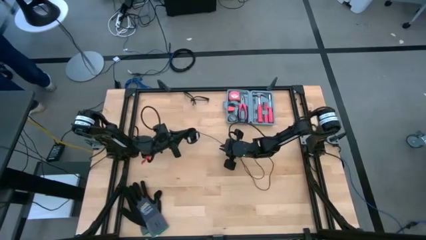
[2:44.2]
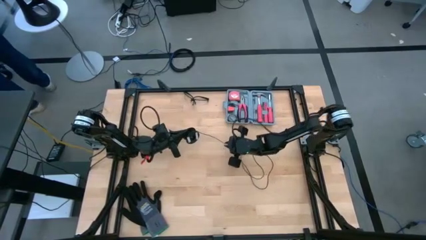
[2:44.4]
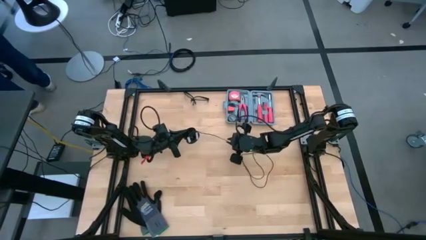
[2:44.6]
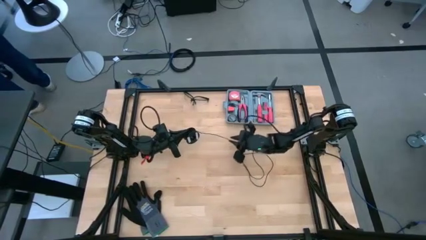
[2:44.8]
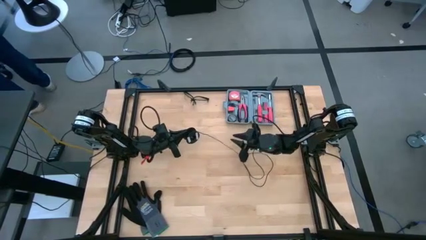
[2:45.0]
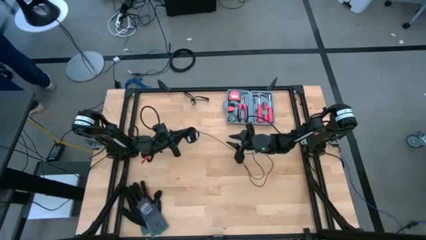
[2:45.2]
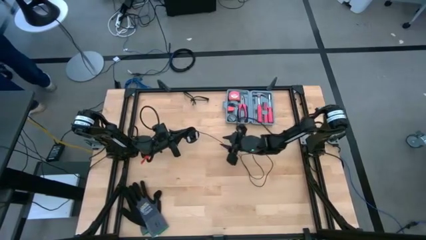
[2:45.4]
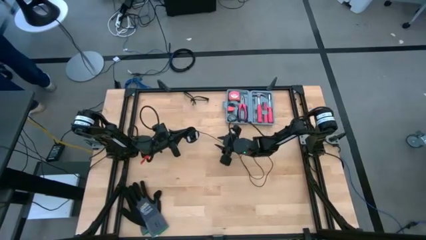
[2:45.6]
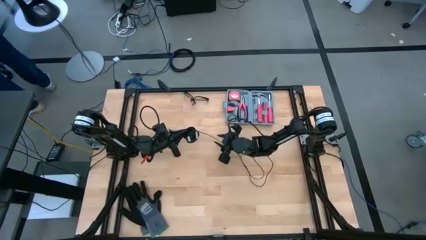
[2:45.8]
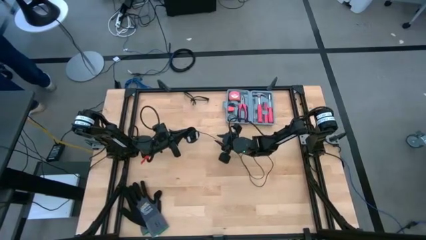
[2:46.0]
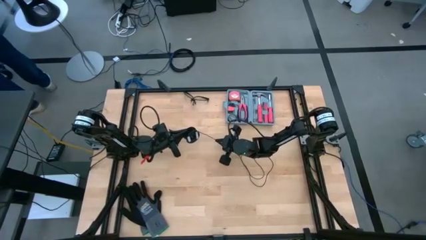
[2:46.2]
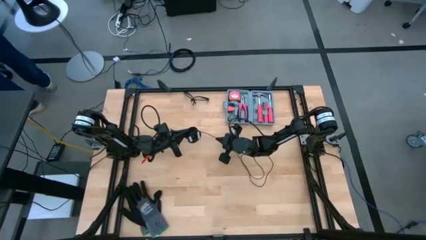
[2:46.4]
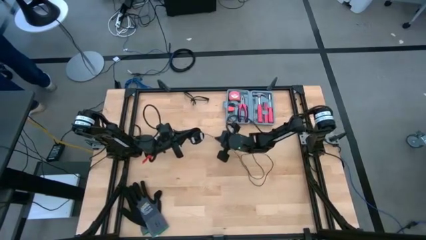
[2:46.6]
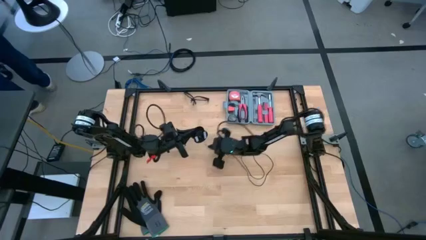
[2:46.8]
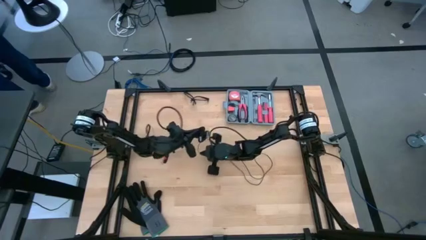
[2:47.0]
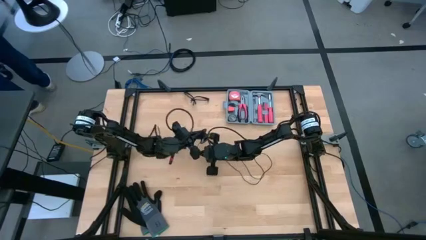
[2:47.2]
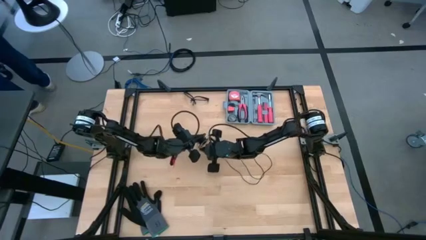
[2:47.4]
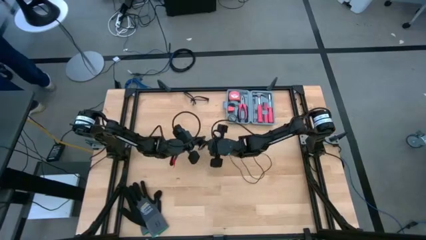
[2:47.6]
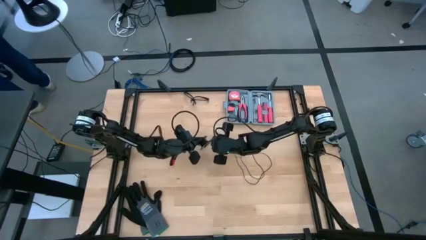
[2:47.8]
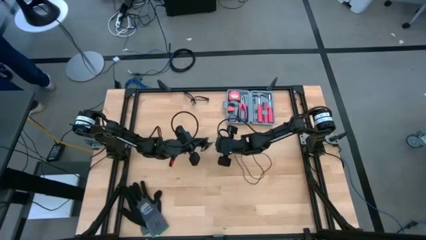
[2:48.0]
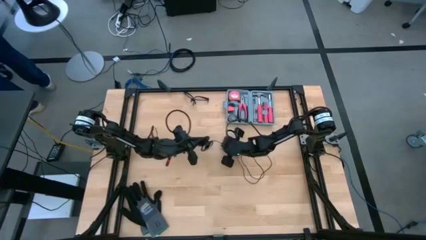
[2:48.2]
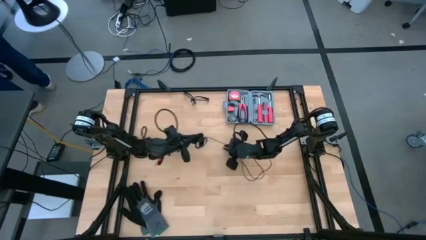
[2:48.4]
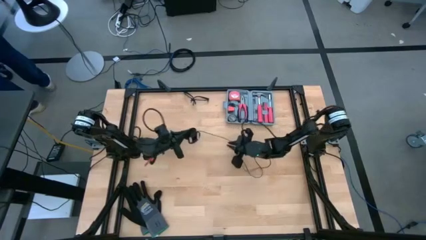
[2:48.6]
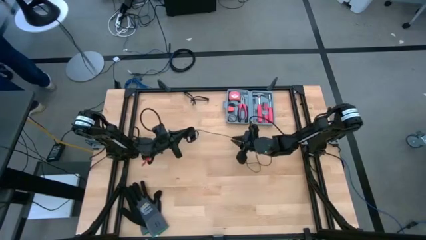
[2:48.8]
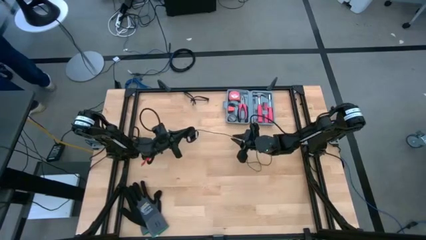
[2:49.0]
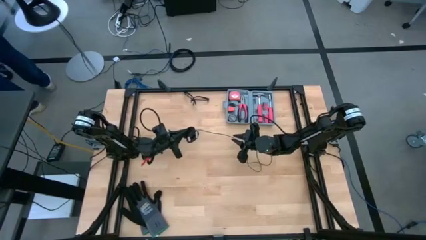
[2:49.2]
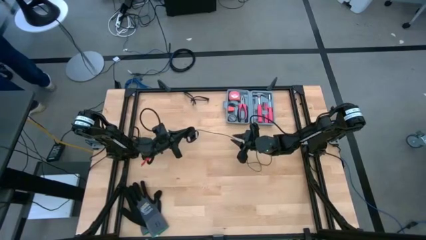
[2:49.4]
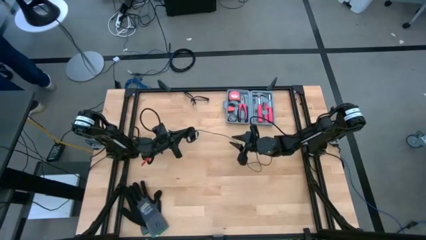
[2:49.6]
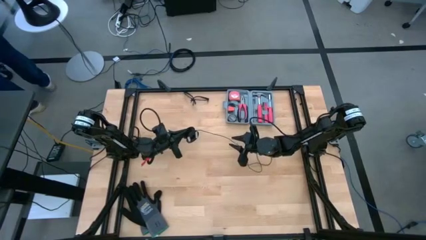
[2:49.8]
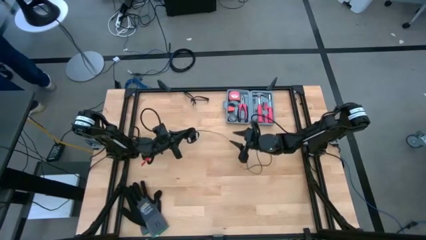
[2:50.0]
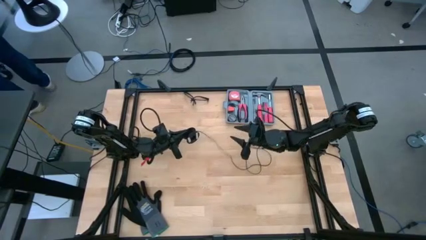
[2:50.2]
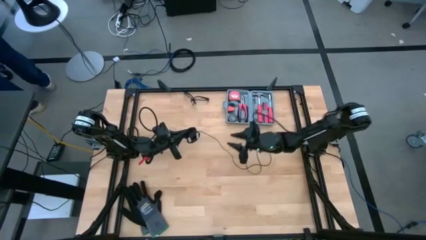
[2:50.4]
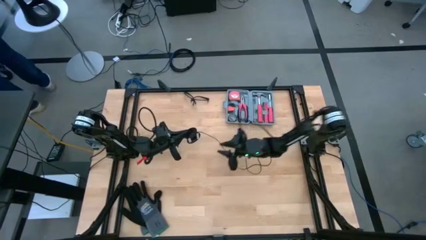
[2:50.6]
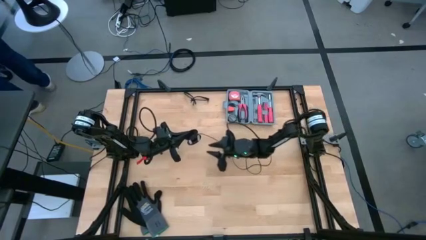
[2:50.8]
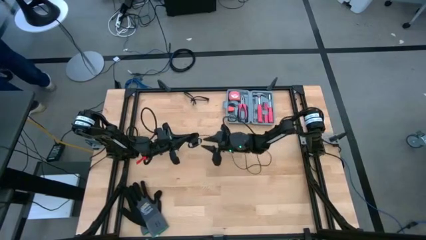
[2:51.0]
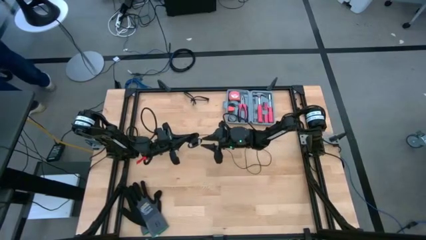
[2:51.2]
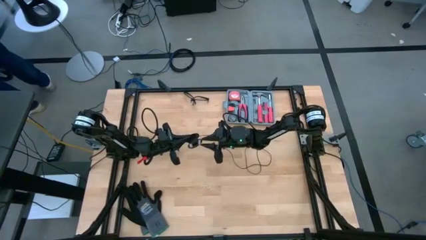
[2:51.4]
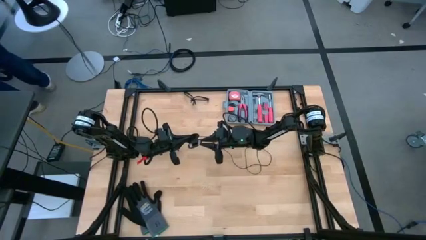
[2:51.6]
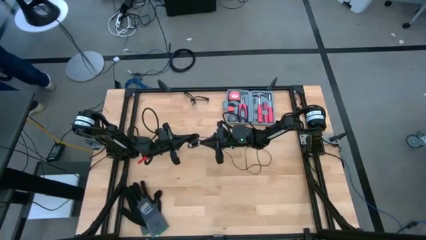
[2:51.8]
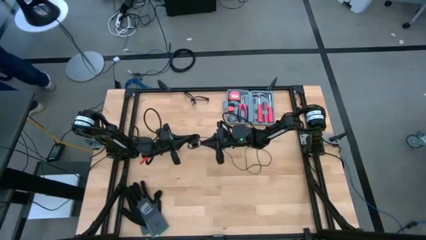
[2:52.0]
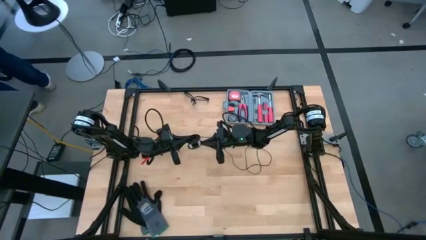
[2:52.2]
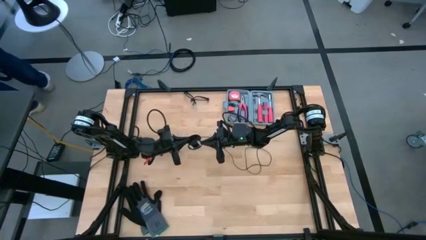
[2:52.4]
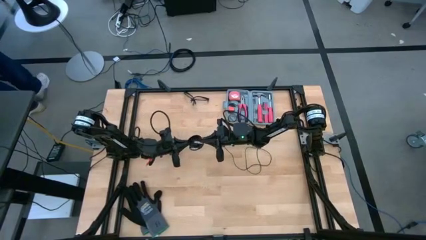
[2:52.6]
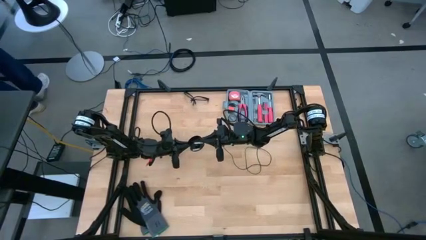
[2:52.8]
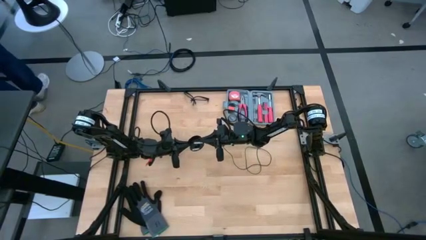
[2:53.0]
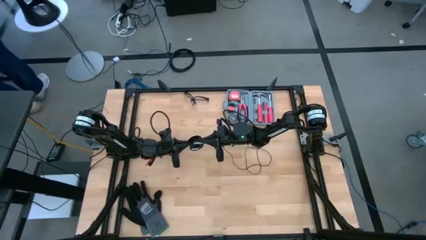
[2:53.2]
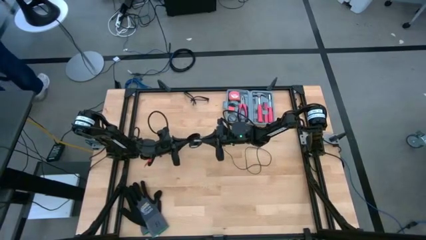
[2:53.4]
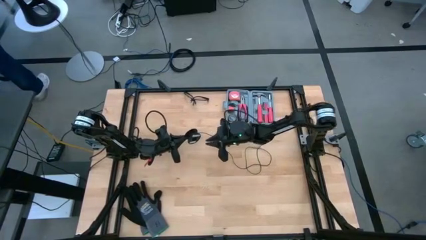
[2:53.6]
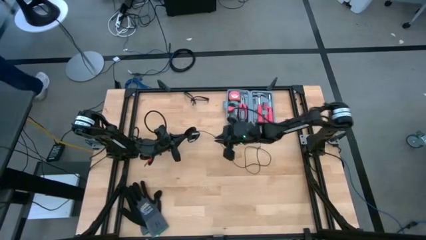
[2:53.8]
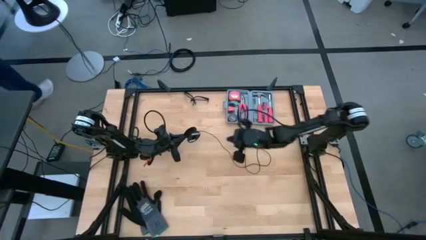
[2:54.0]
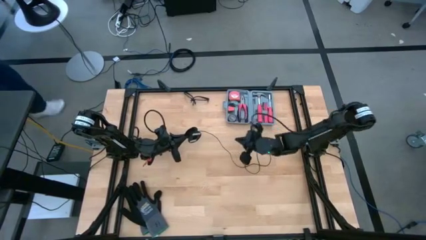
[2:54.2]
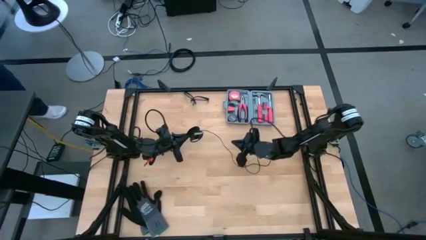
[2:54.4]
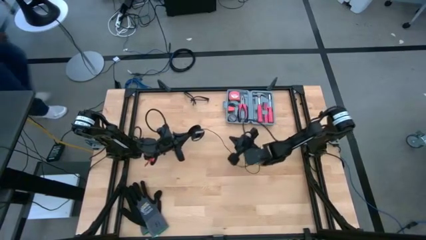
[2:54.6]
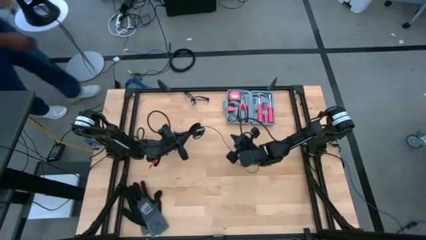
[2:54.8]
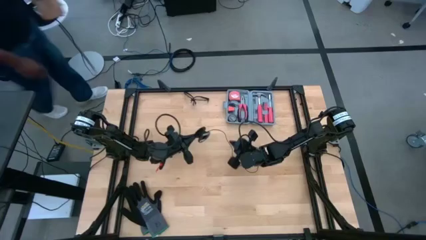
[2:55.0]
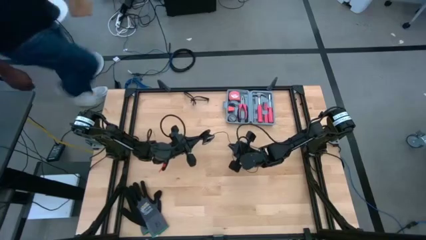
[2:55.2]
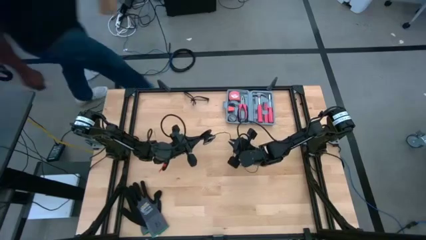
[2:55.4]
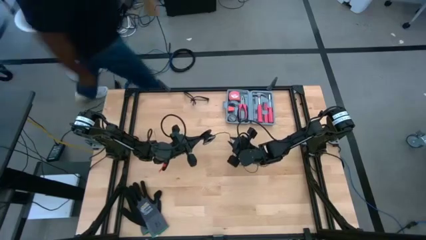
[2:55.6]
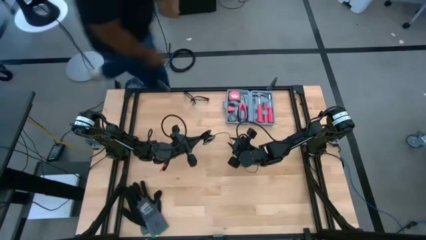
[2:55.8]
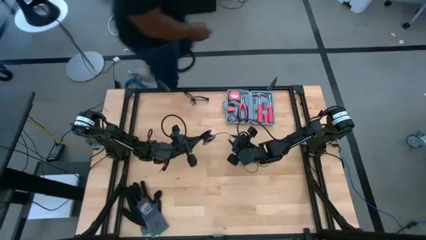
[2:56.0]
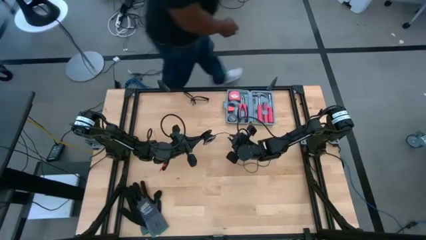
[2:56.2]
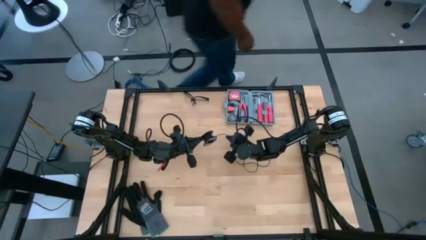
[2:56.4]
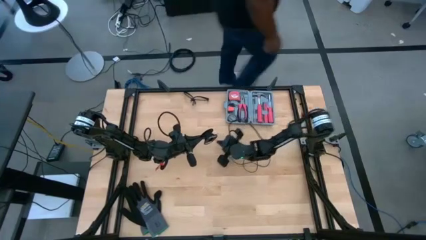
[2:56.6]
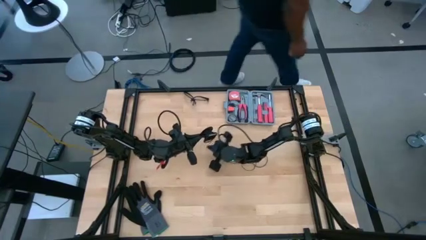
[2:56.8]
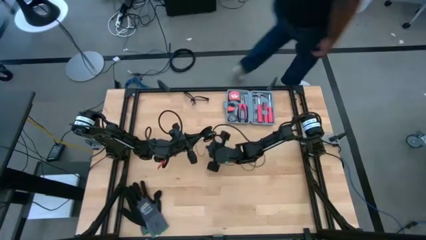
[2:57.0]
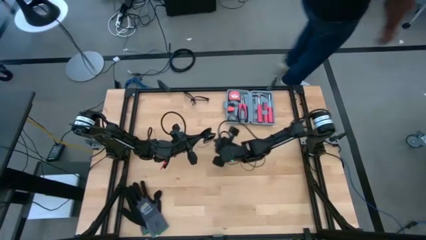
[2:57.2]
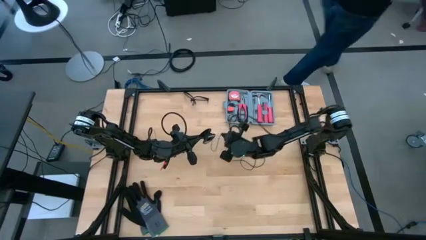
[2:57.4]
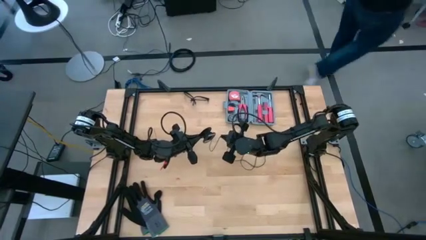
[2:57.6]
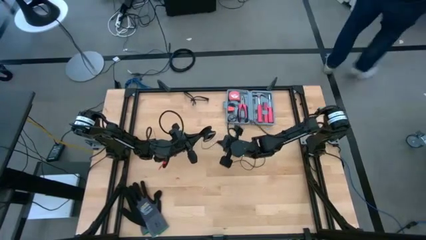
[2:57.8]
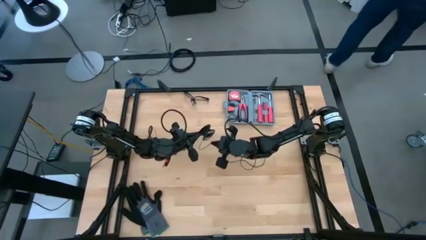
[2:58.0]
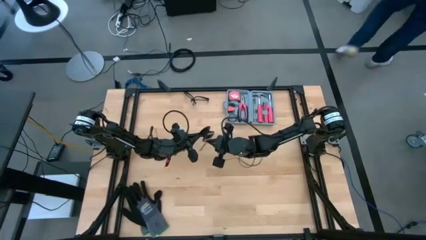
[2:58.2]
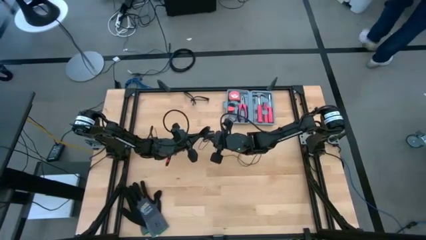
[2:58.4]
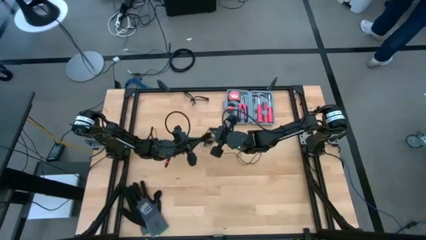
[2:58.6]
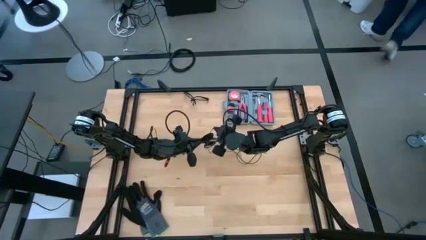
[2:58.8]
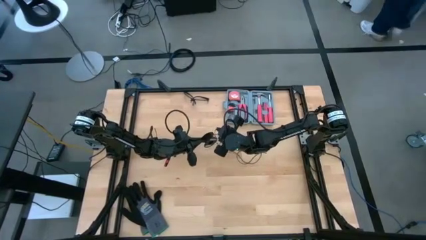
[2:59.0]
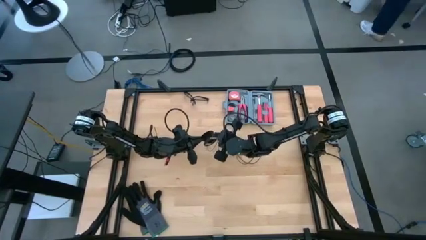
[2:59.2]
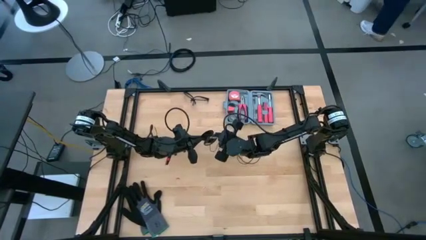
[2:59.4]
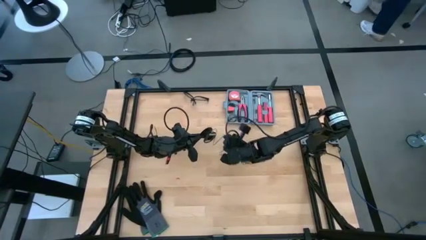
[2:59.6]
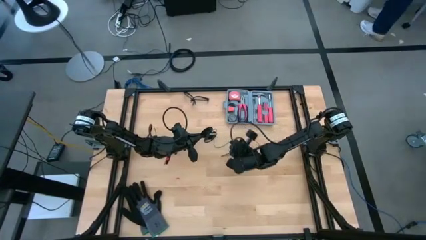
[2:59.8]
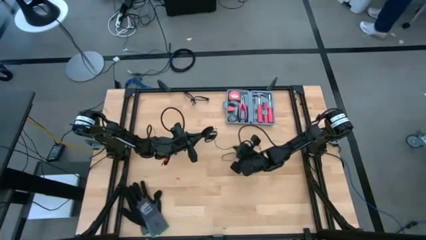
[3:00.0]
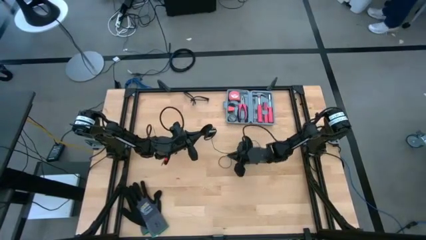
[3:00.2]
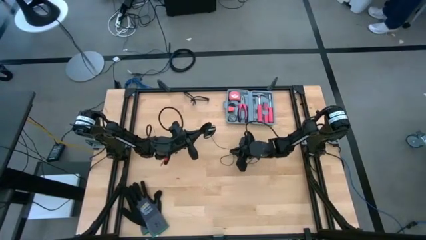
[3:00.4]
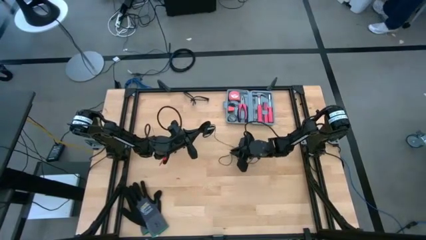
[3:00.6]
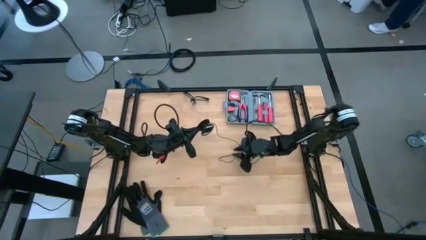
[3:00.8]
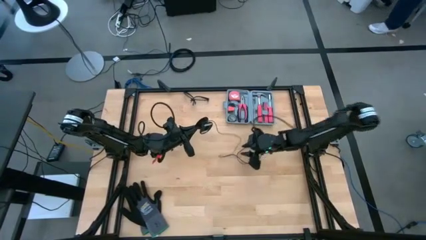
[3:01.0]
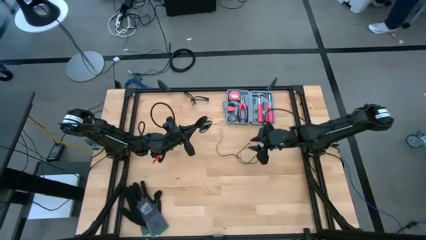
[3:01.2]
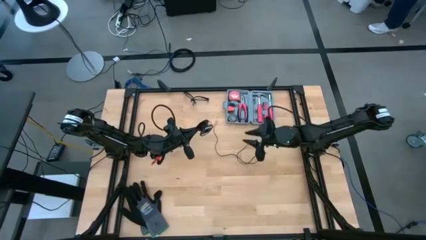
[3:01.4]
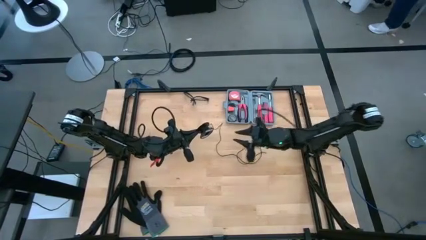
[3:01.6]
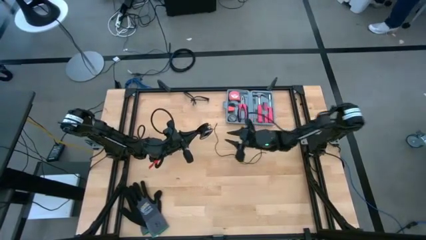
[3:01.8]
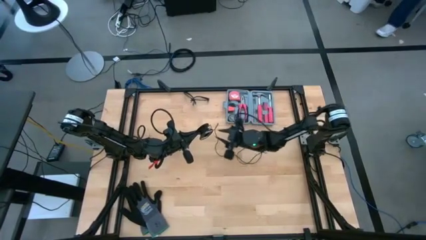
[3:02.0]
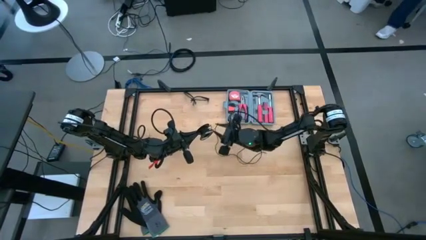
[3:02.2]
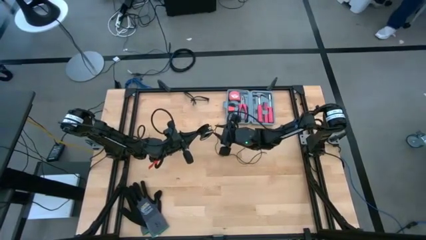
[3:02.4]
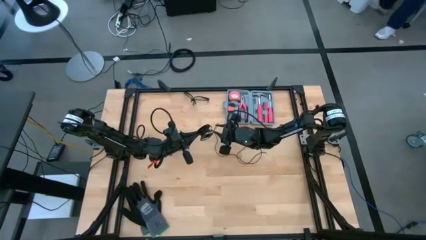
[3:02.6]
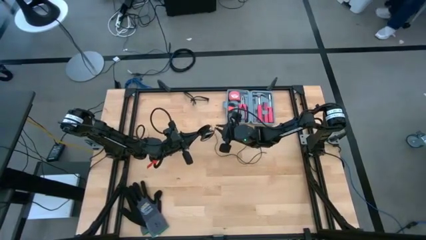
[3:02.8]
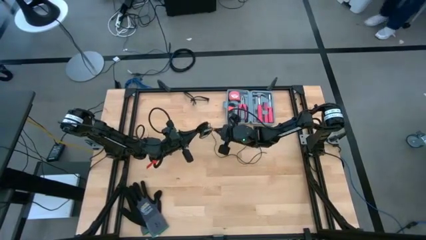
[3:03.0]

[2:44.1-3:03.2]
Task: Coil cords
Coil the black wire onto the spool
